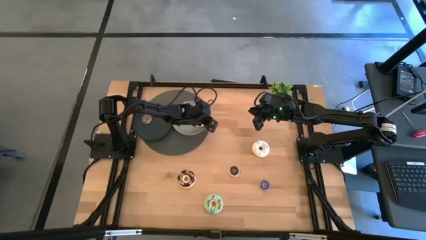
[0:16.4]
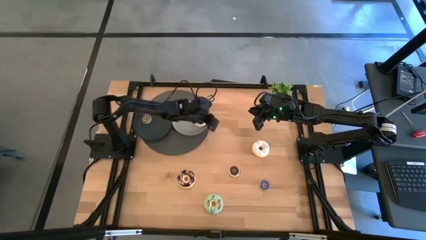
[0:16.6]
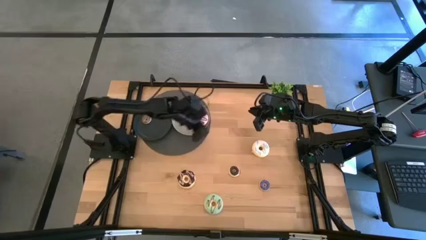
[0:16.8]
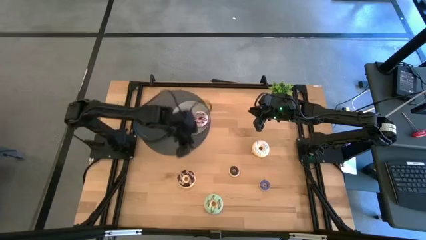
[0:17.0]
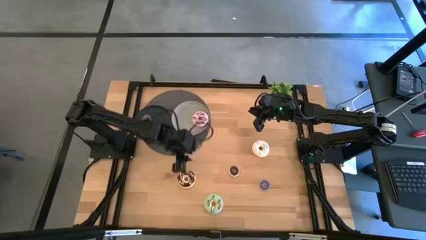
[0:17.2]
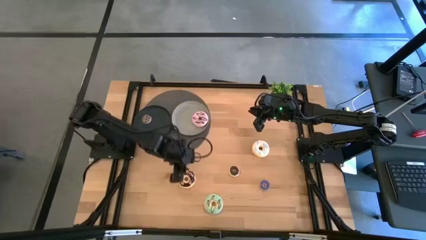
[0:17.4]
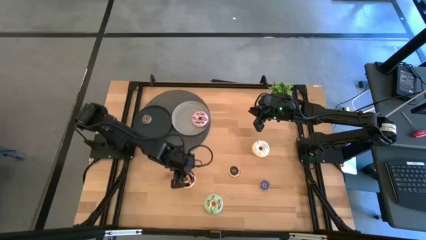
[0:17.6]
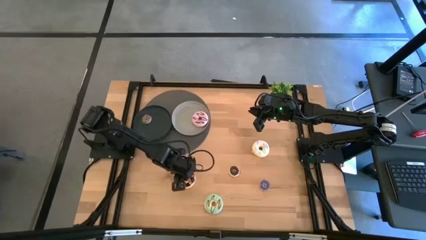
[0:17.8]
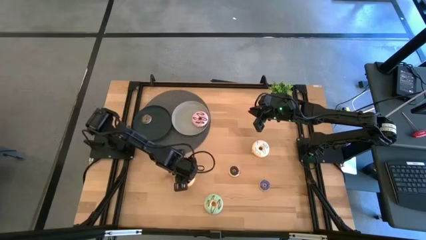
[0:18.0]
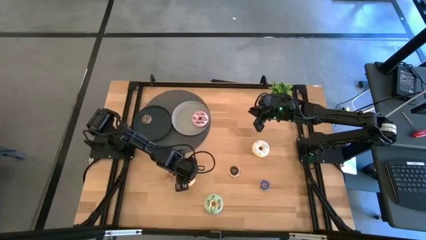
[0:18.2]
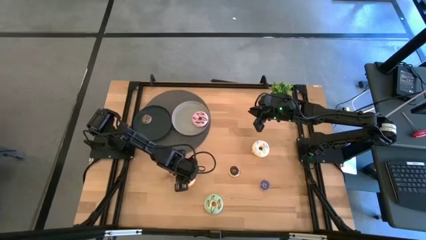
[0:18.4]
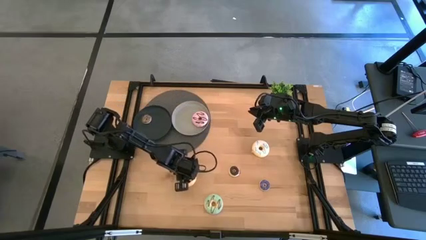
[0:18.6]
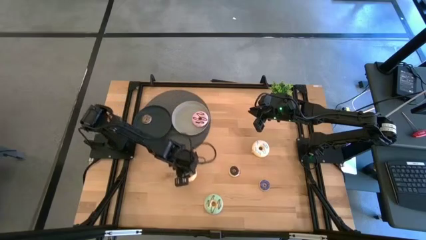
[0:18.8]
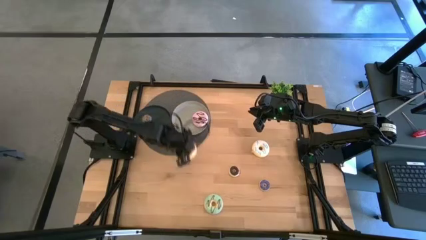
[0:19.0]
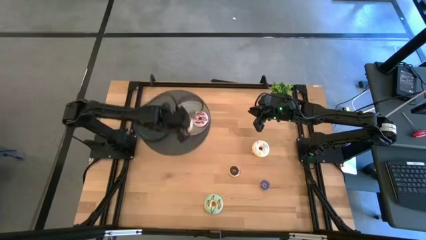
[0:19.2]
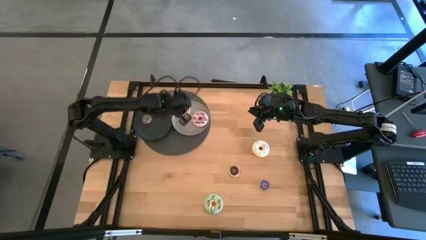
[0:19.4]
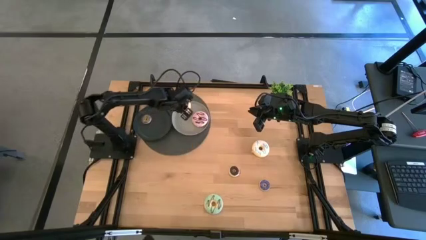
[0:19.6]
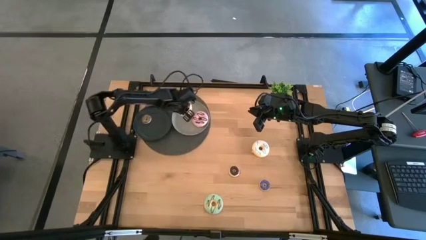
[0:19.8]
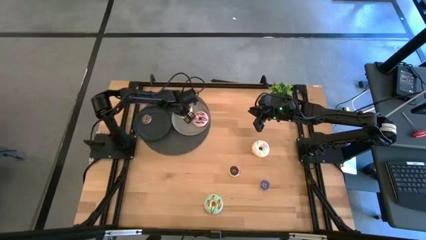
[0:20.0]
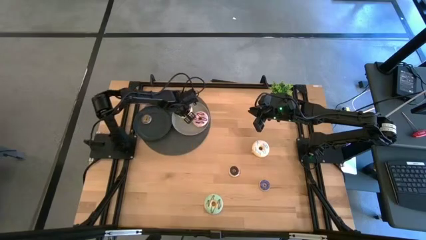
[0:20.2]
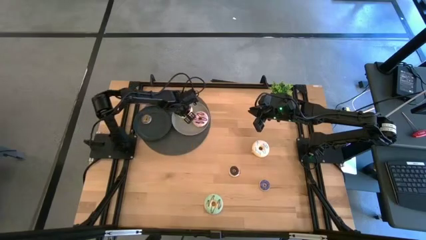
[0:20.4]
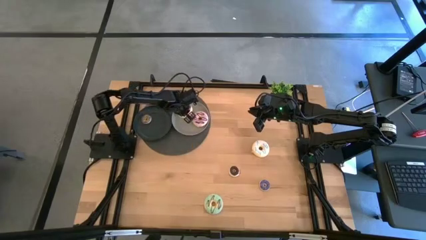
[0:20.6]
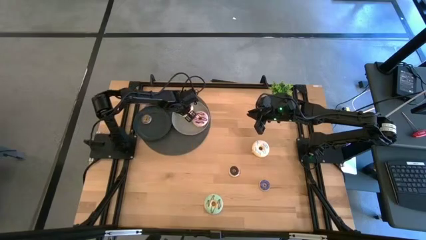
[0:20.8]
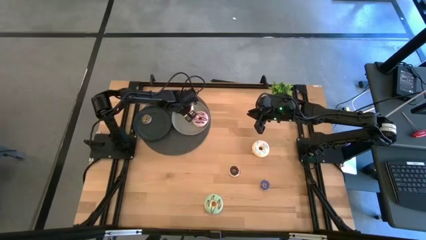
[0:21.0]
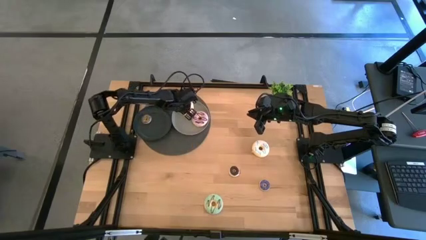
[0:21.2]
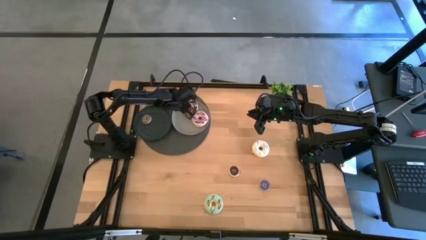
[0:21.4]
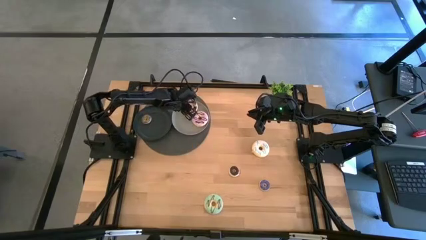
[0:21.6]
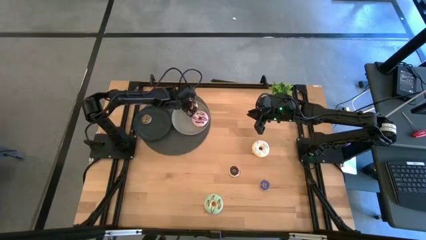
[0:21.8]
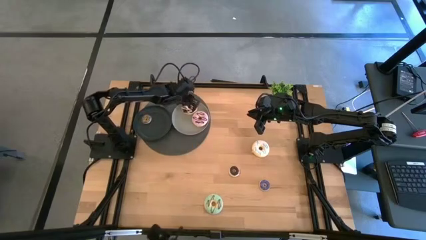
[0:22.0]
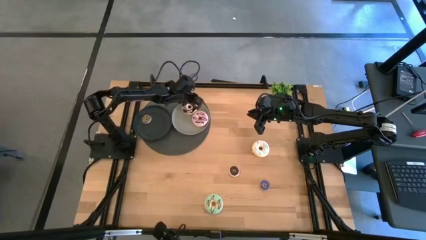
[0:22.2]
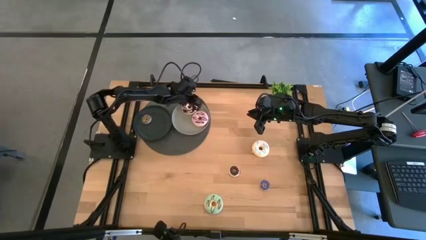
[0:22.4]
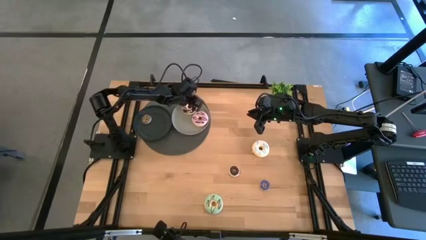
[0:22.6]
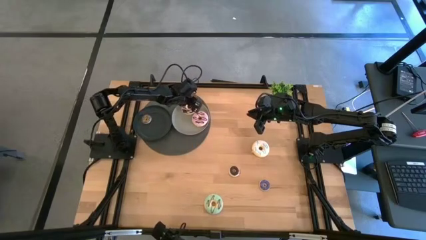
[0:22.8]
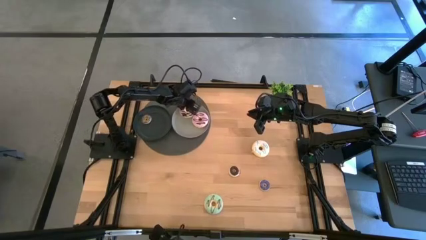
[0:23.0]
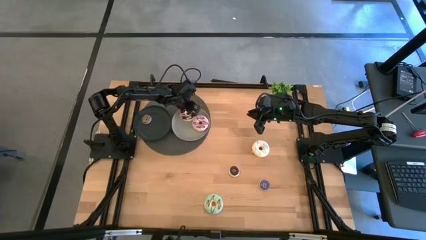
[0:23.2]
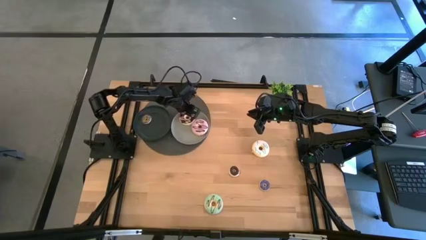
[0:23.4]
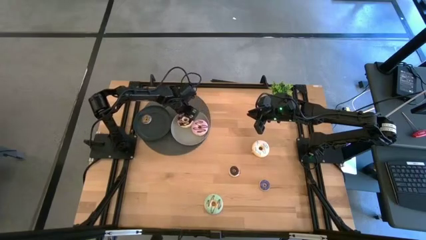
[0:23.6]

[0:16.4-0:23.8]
Task: Pick & Place donuts
Put the big brown donut on the gray plate

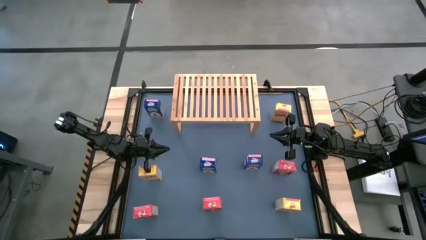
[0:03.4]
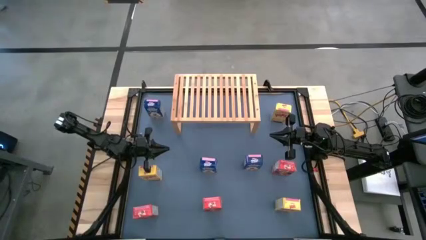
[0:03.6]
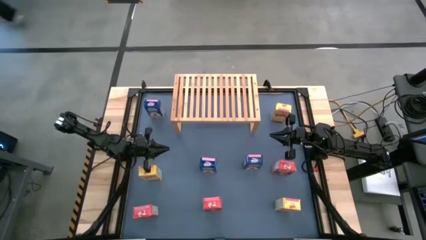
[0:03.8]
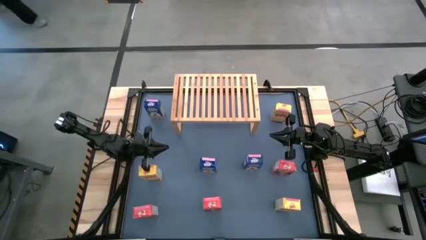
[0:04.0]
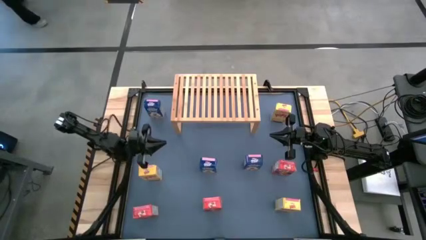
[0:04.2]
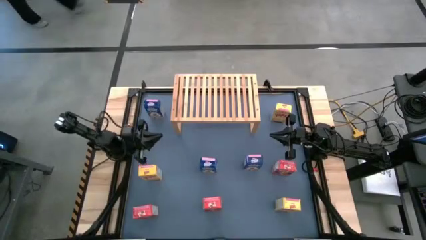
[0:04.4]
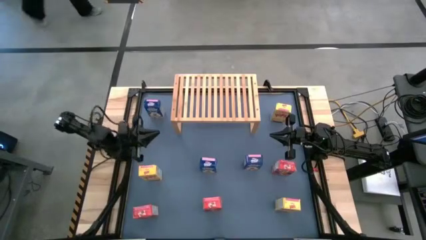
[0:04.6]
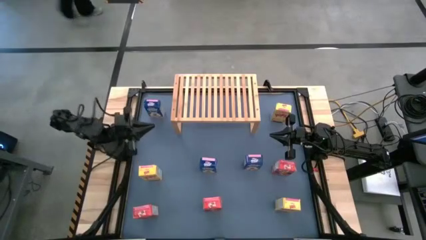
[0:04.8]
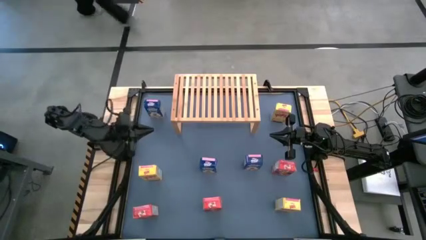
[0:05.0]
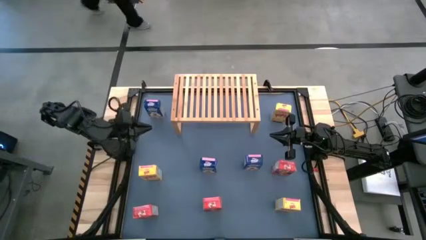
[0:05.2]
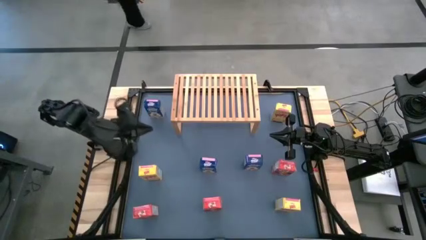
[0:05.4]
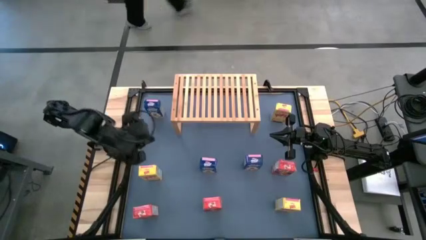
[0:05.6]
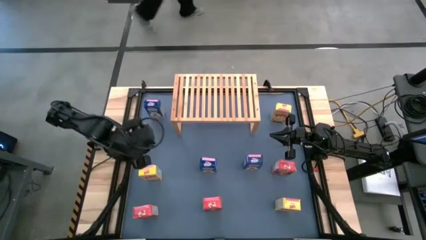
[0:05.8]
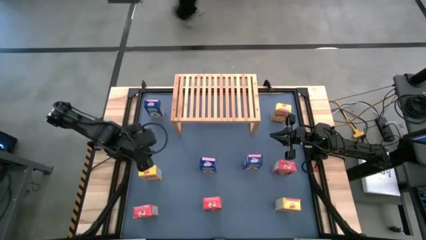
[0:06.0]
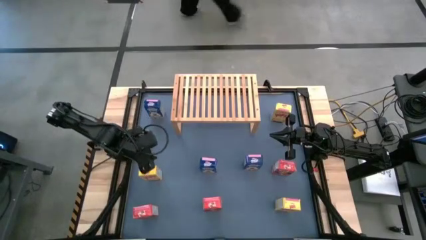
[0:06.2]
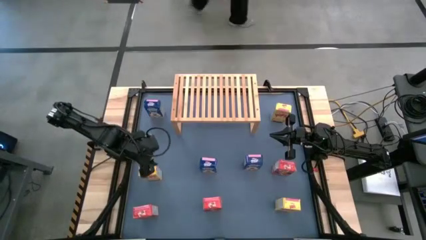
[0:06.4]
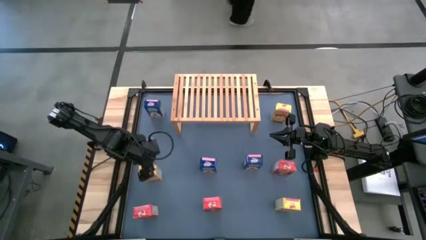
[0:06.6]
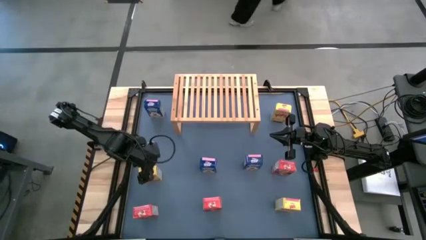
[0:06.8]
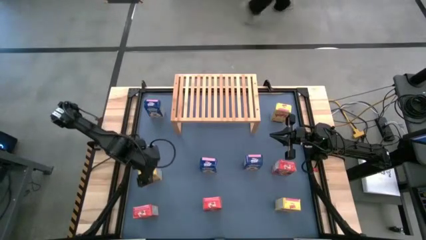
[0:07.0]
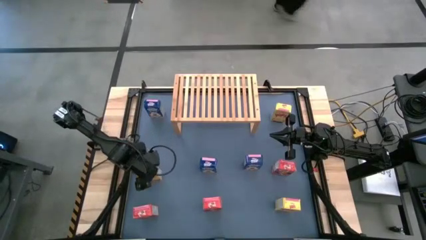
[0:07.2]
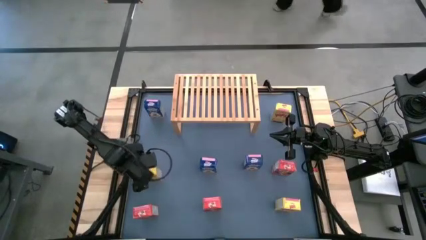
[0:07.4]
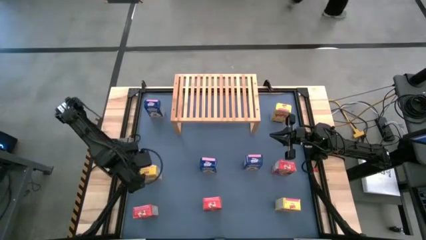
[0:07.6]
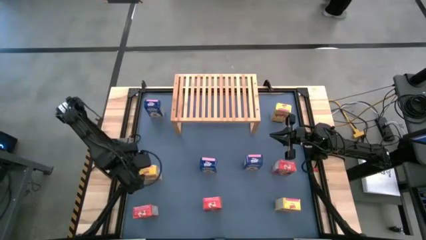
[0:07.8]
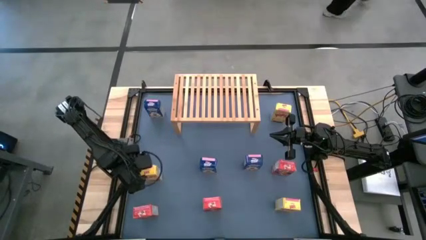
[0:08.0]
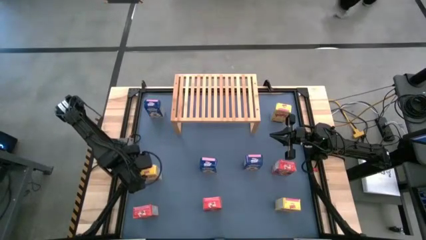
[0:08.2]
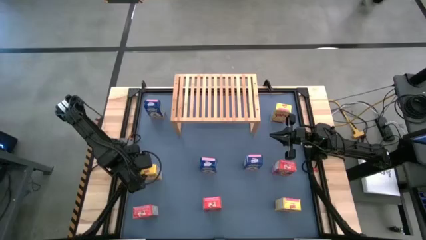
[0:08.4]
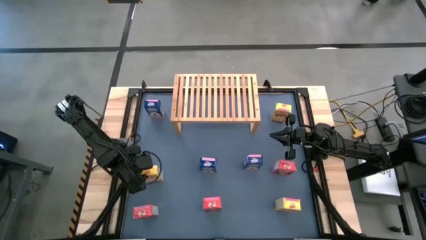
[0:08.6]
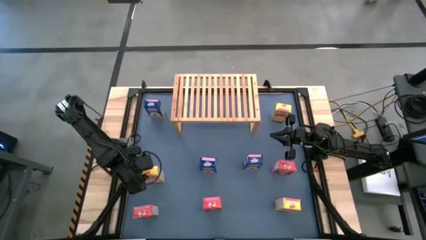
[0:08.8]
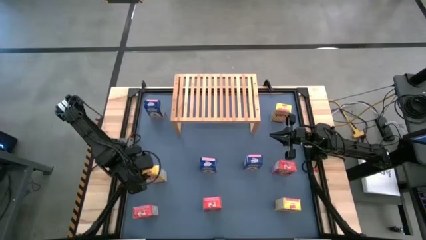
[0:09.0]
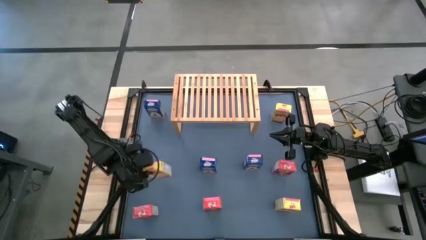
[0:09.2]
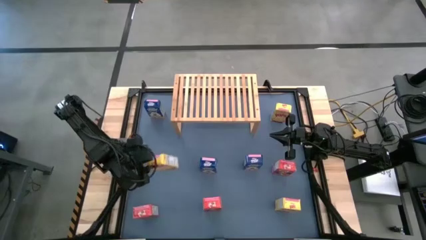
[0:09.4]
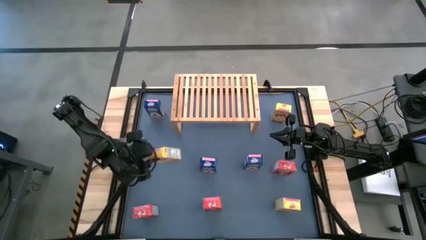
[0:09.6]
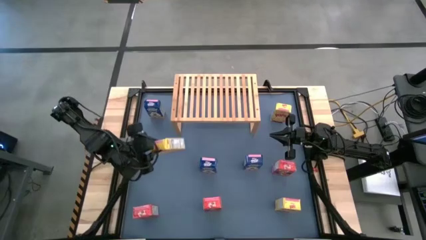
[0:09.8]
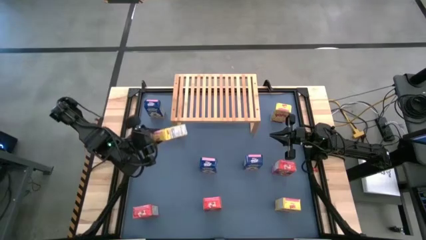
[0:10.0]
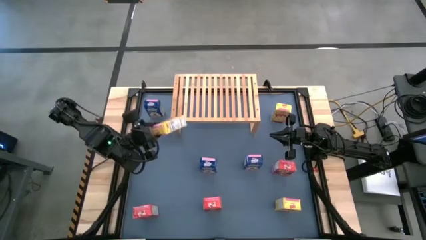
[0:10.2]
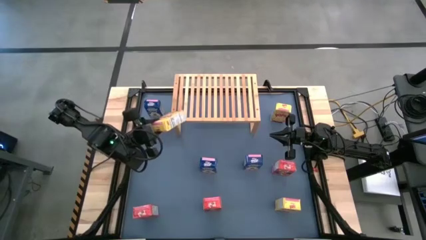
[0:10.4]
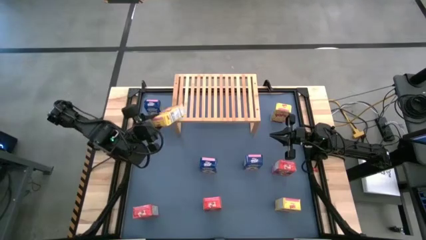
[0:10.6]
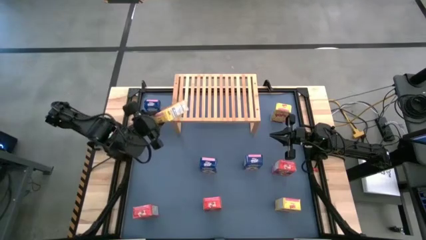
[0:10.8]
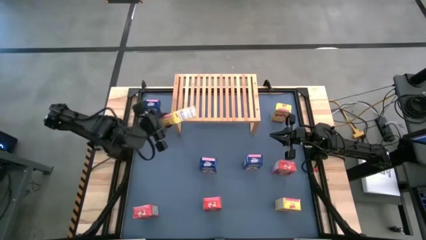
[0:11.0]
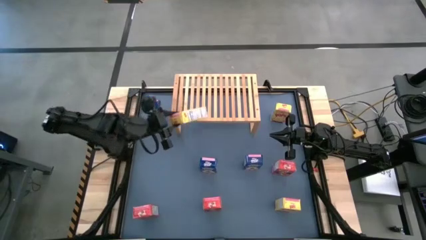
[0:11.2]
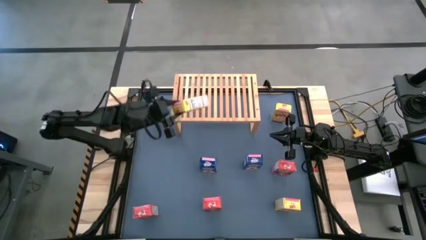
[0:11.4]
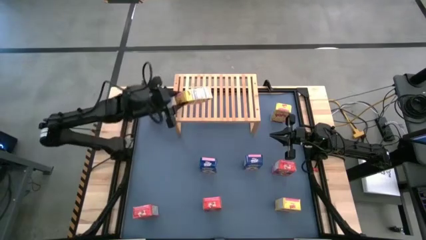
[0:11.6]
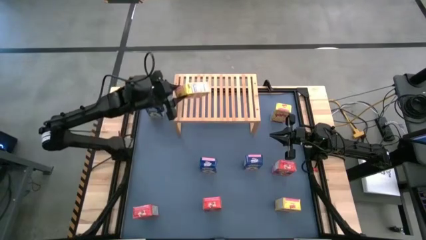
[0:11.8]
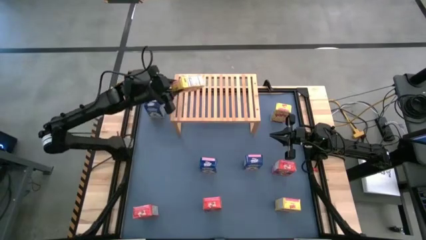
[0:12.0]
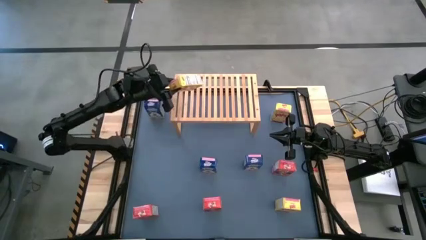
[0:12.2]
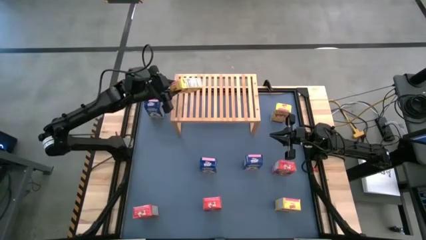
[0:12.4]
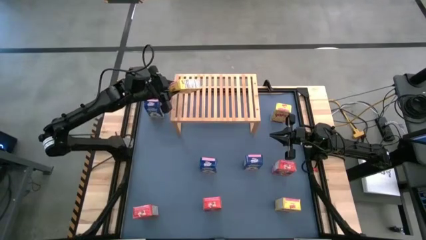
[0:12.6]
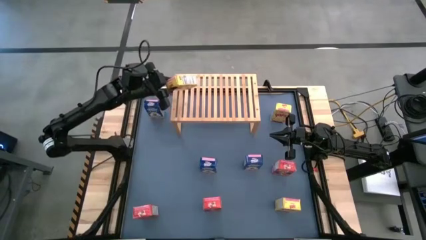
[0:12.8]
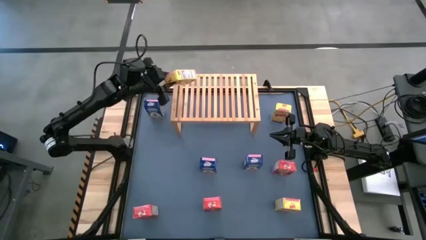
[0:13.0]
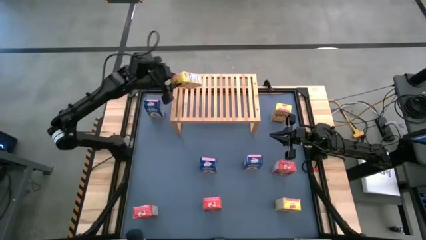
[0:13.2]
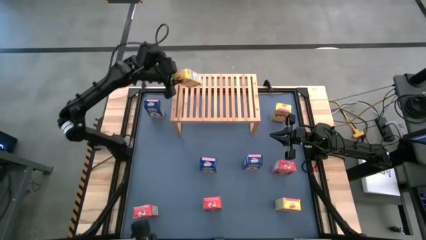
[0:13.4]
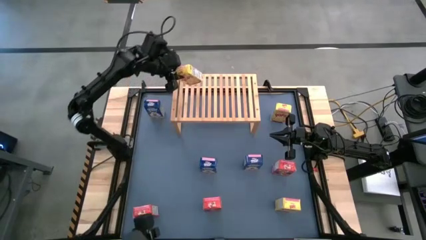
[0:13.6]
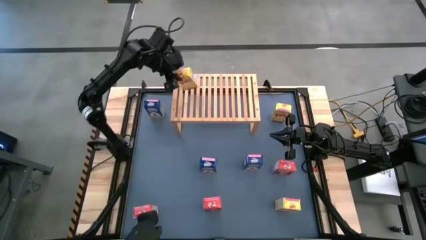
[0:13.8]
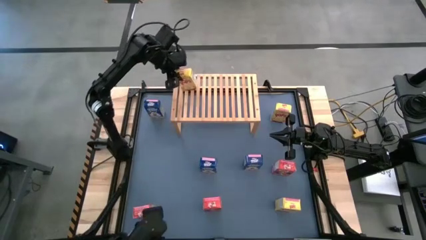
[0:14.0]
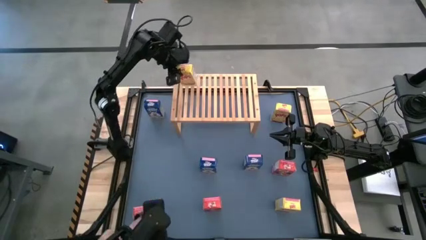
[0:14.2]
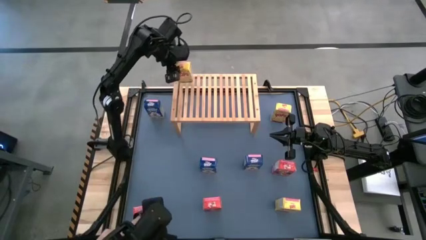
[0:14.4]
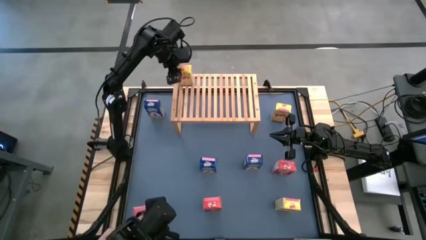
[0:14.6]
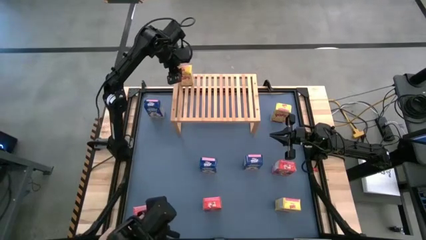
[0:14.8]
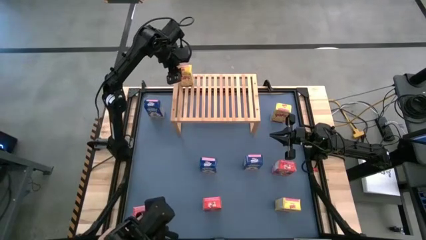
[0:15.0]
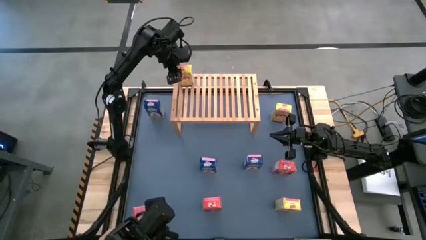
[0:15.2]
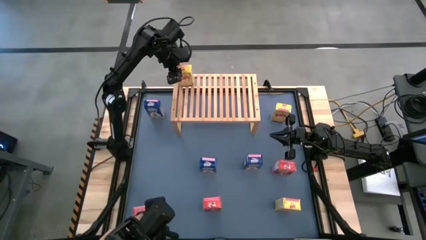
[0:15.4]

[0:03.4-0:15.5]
Task: Stack cereal on shelf
Put the middle left yellow cereal box on the shelf
